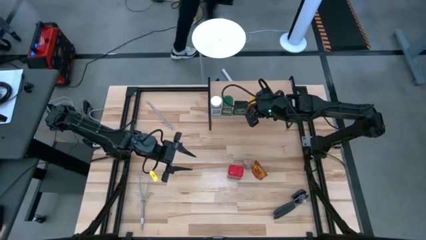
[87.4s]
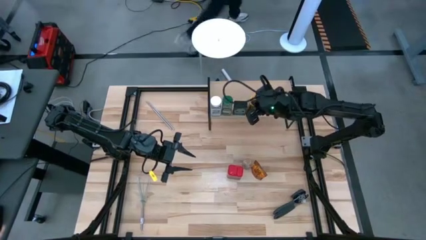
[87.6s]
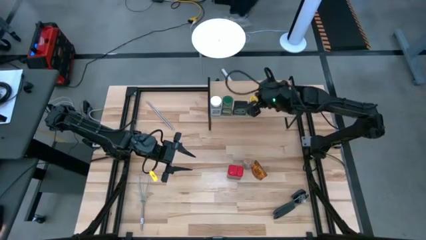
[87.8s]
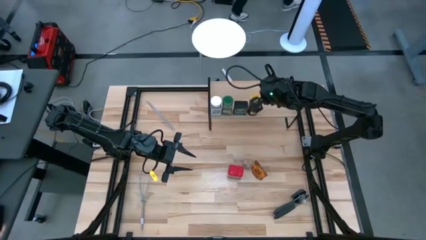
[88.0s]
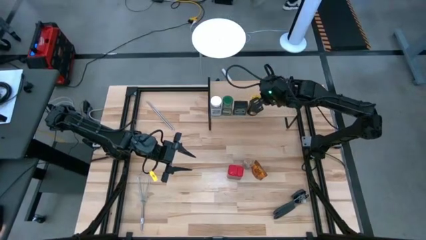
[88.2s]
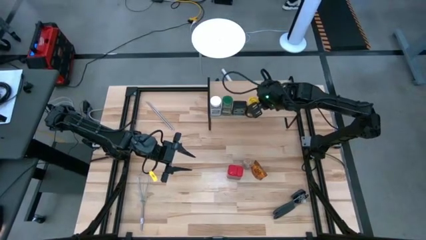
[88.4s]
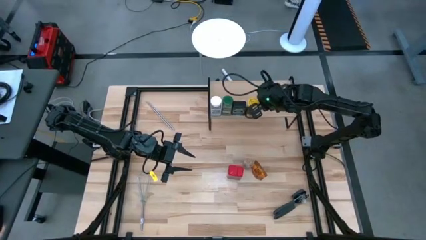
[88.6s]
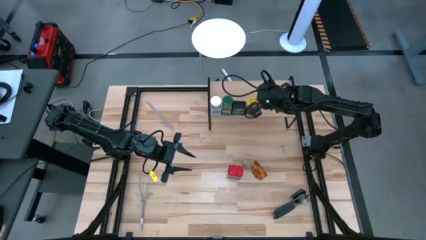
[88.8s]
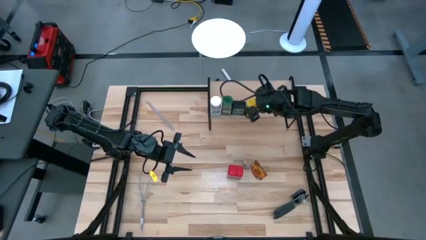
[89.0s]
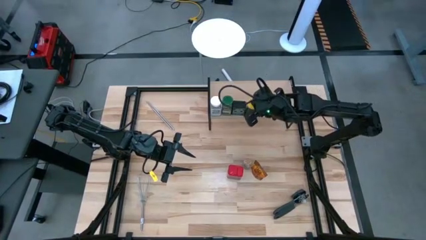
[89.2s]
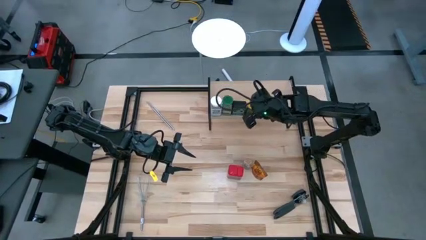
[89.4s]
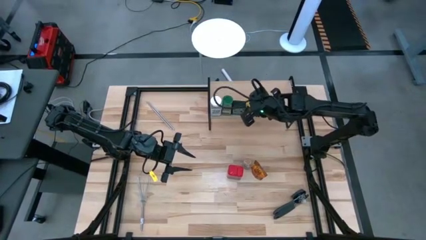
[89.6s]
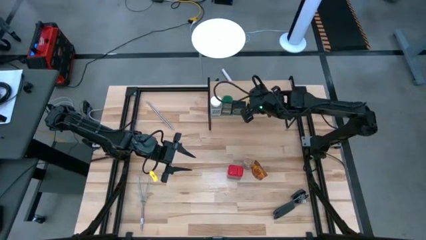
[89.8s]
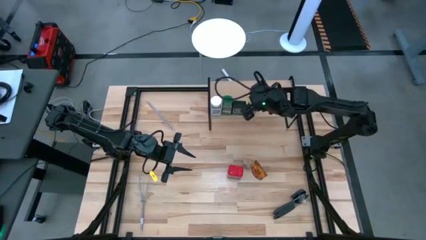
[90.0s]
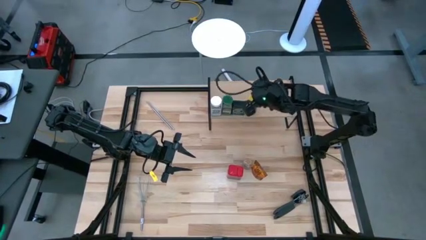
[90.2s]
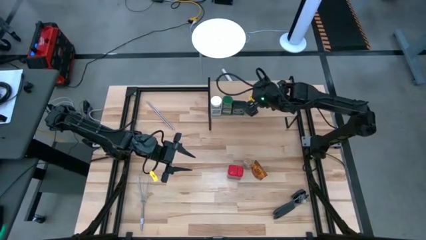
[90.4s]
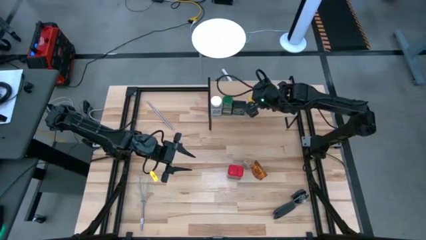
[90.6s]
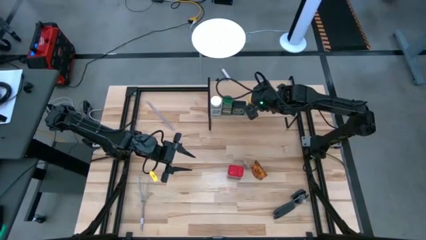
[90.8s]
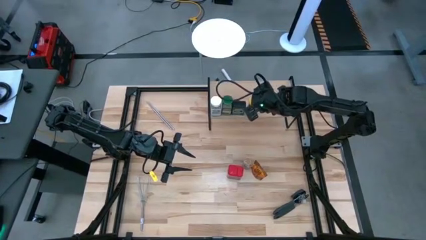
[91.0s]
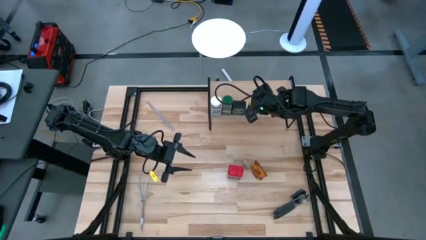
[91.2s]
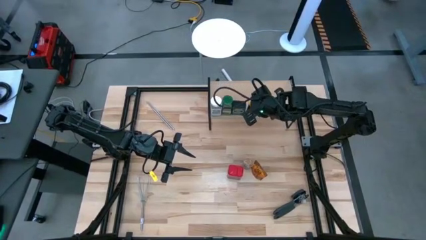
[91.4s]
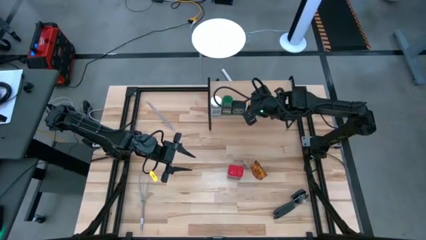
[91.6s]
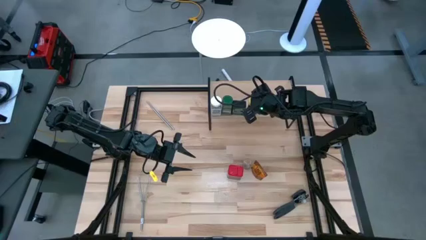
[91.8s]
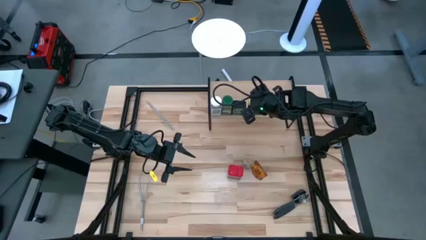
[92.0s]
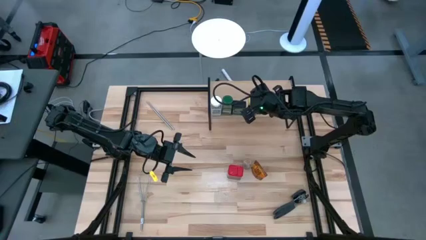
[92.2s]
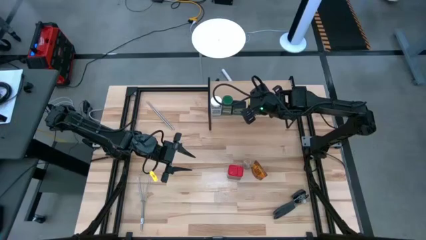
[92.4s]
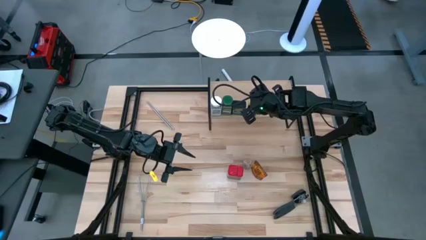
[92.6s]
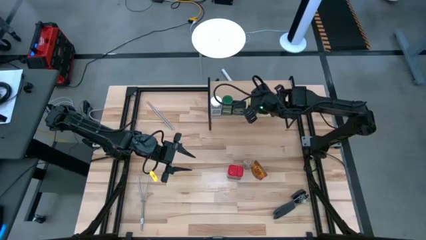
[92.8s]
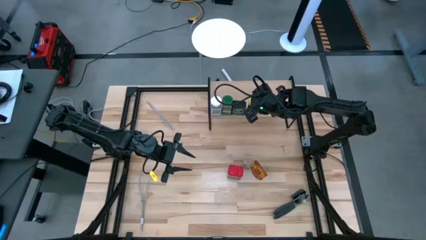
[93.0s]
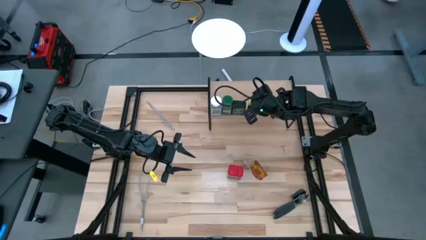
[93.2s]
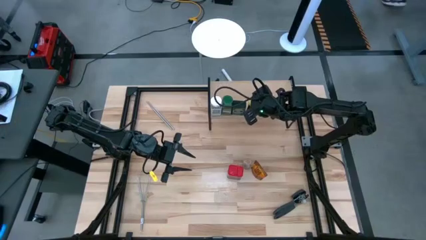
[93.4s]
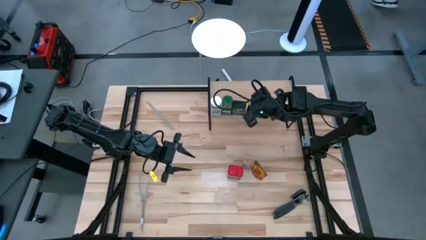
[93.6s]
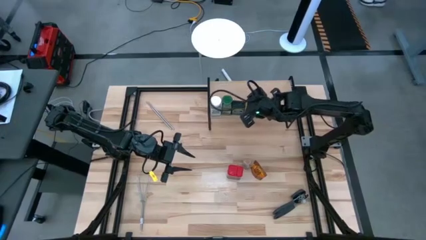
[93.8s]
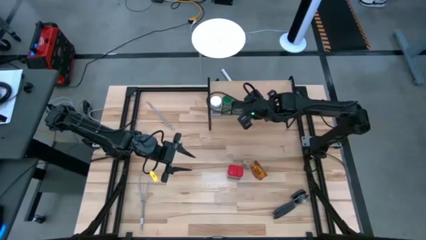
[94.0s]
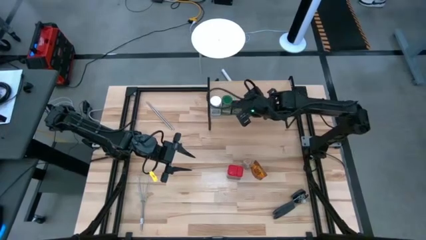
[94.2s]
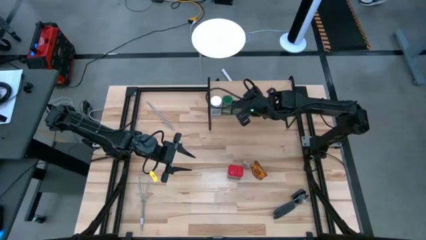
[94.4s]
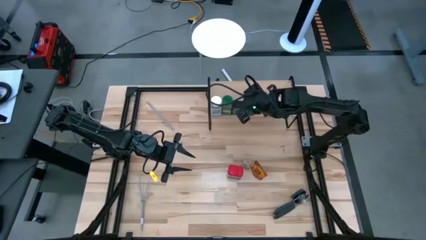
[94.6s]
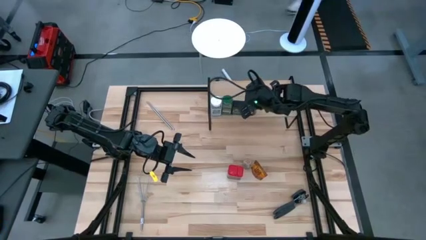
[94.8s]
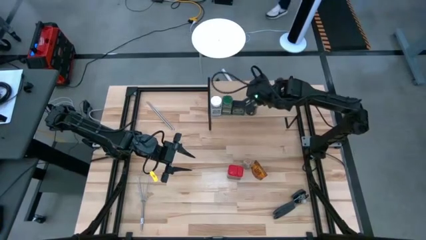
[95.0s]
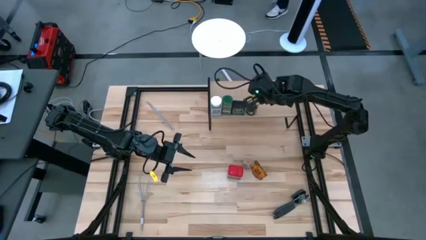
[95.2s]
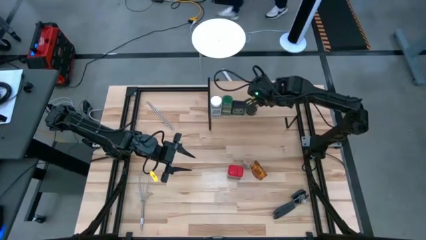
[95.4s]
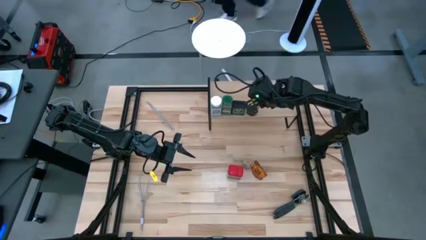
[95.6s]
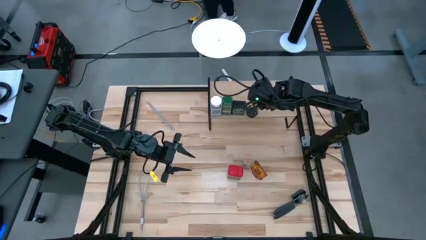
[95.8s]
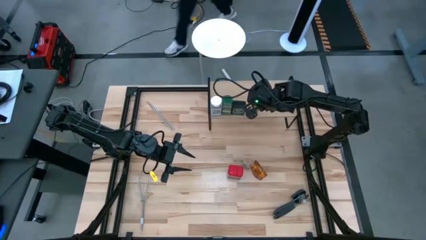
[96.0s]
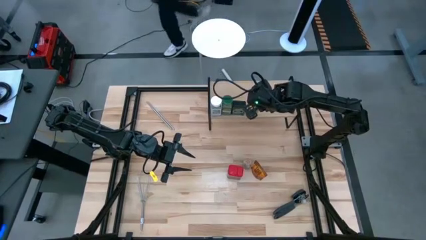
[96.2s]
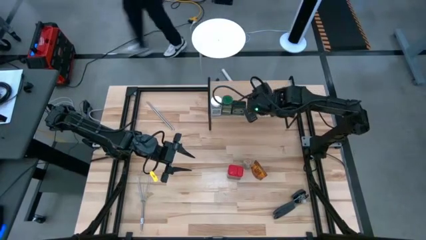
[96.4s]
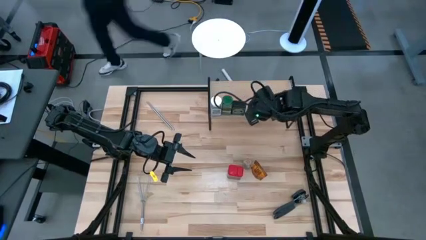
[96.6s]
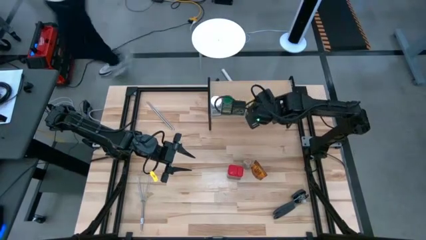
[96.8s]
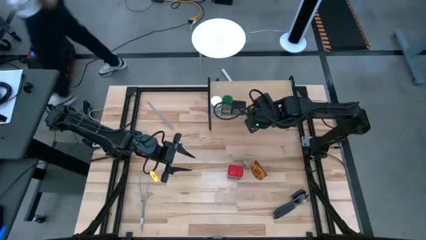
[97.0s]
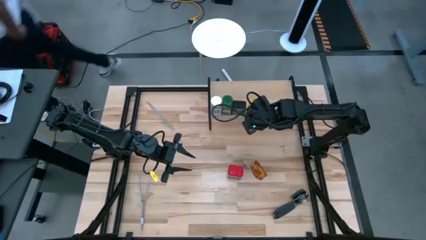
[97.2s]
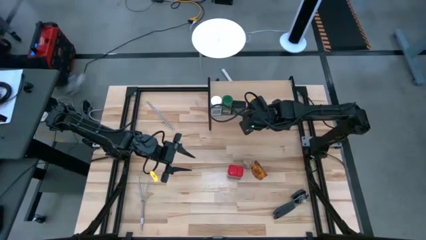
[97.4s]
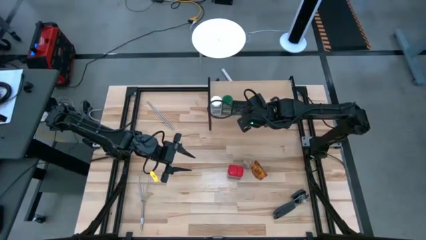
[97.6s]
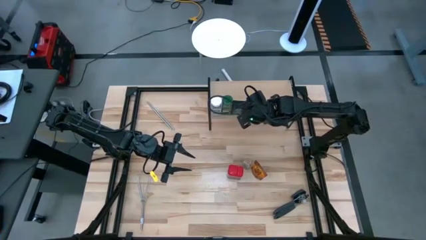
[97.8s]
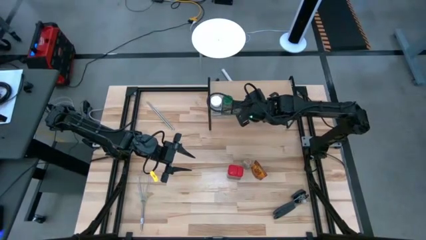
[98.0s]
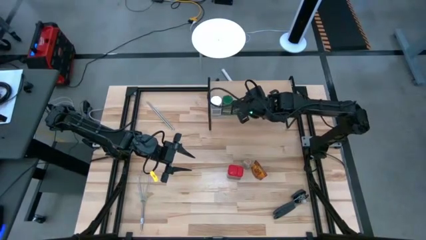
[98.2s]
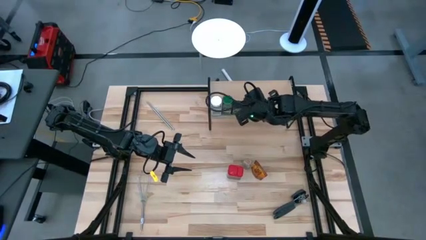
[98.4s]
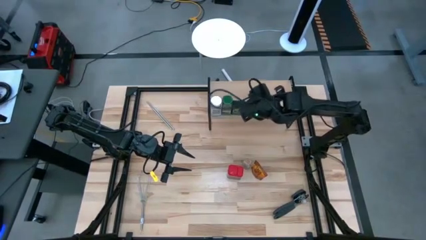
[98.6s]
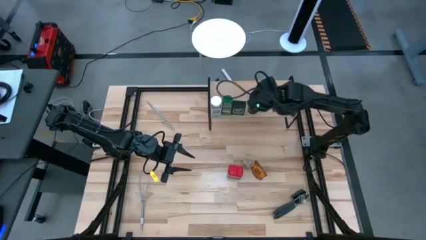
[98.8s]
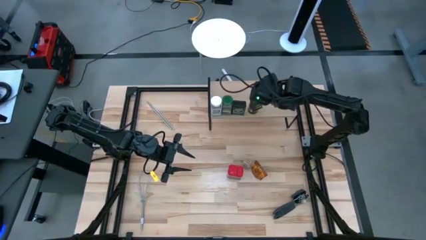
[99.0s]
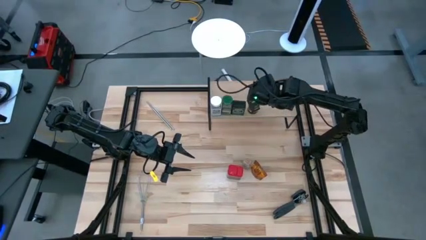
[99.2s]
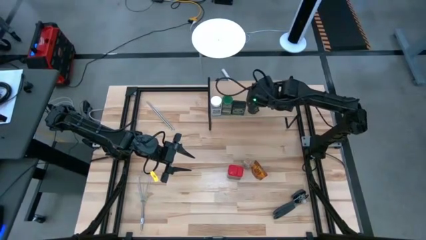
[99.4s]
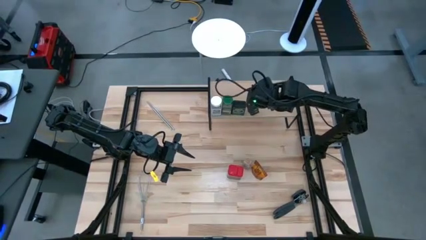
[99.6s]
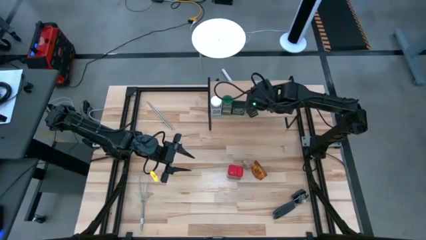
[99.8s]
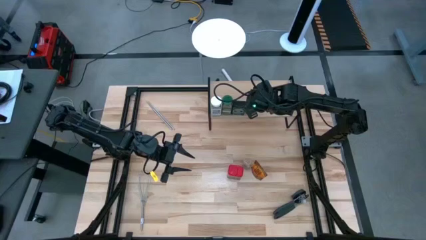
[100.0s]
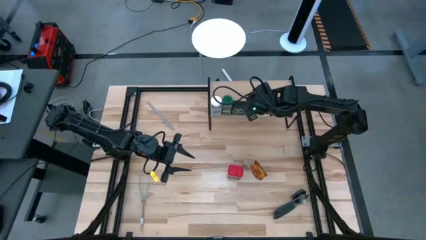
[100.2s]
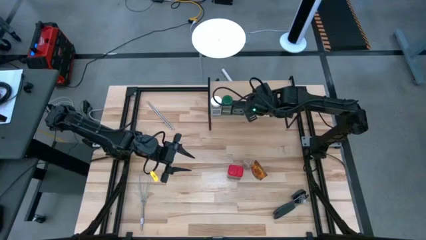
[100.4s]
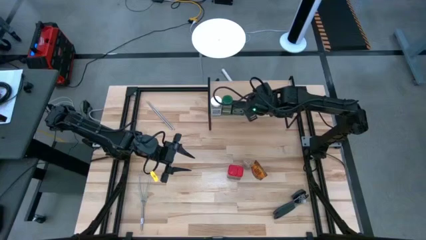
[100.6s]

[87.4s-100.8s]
Task: Shelf spices
Put the brown seasoning bottle on the shelf
